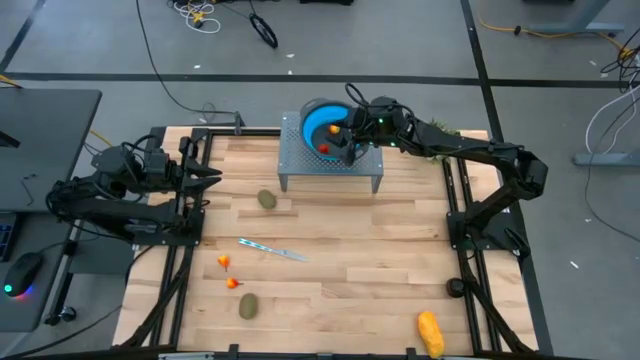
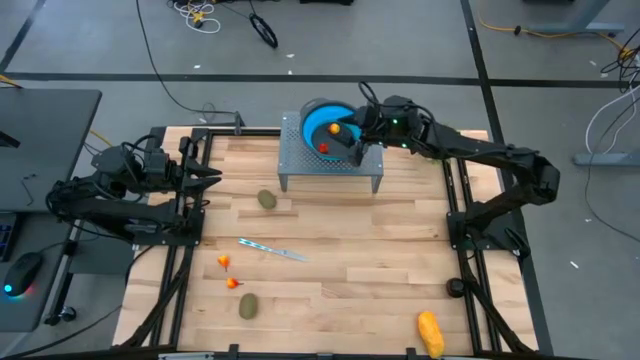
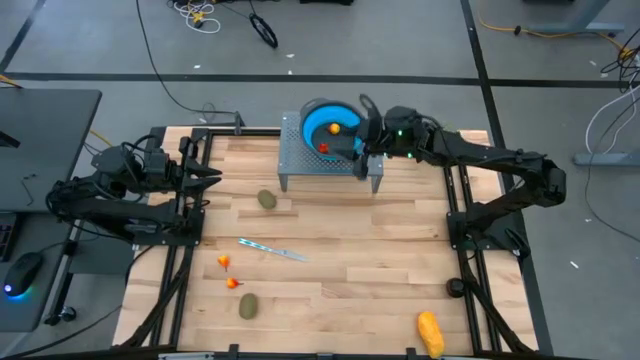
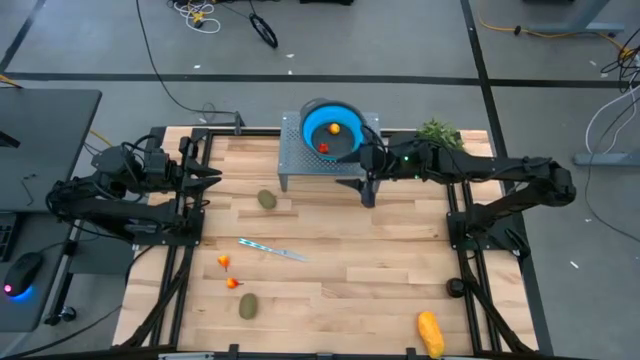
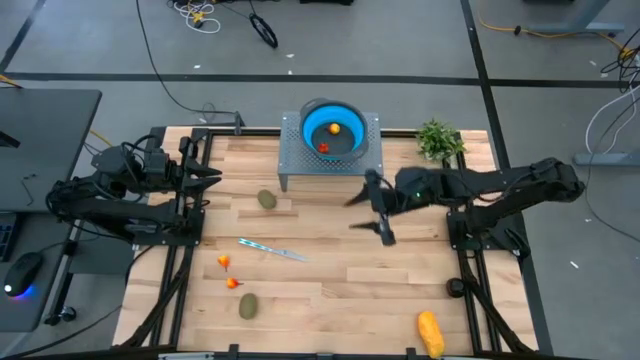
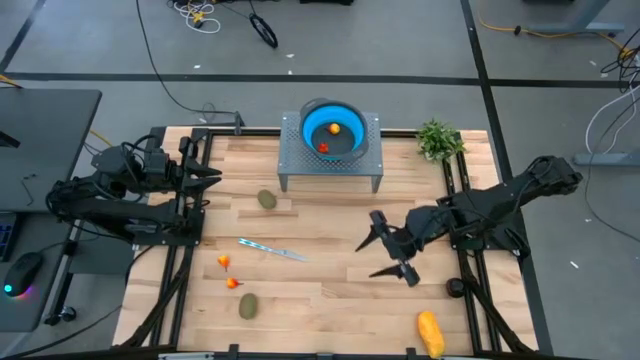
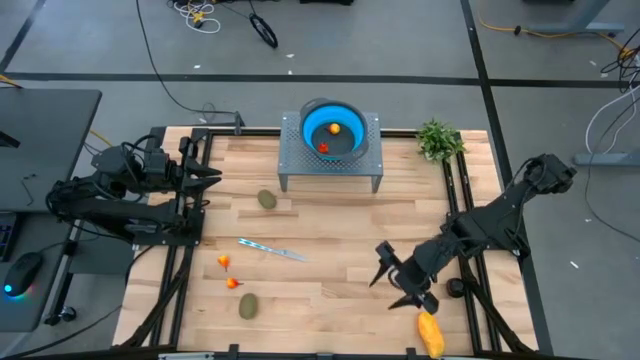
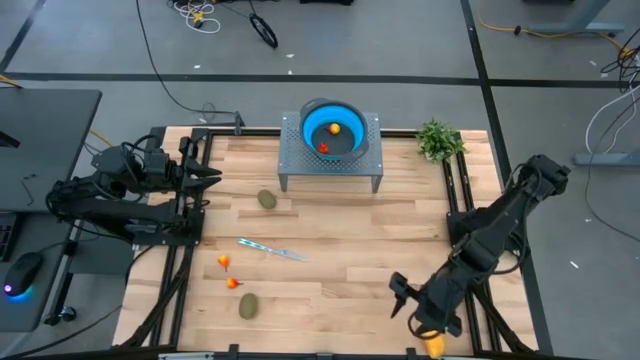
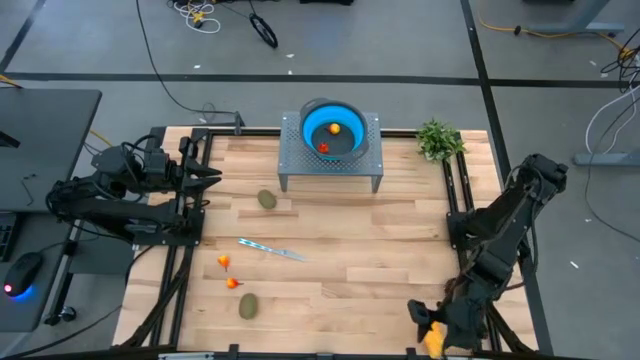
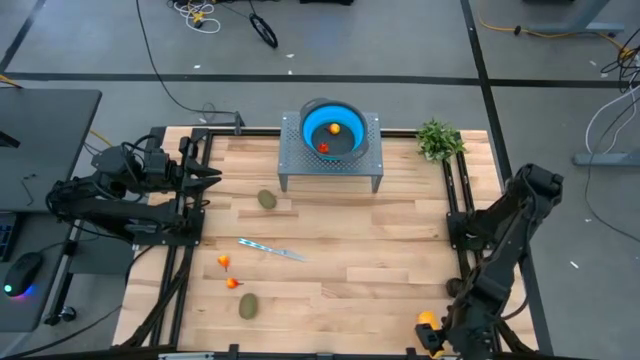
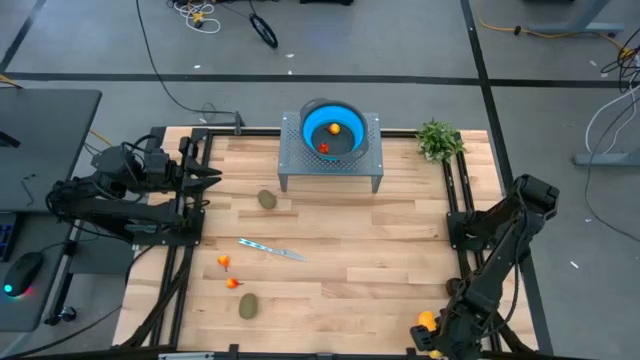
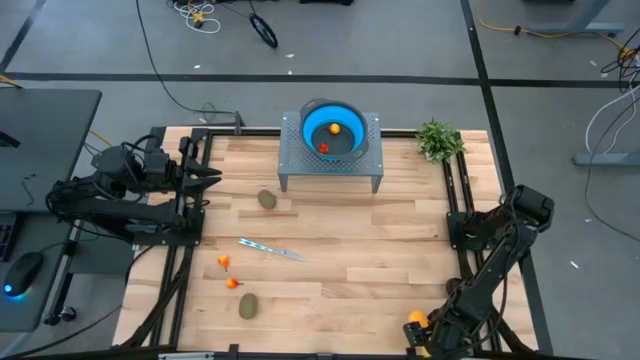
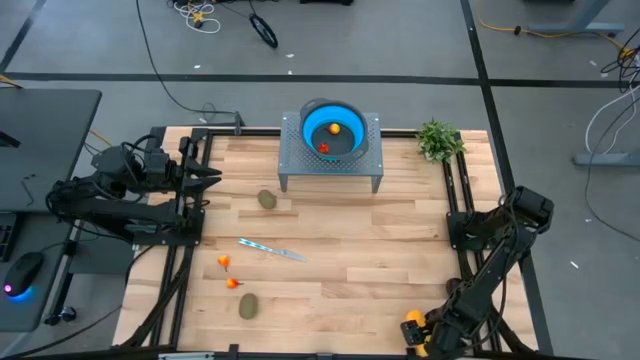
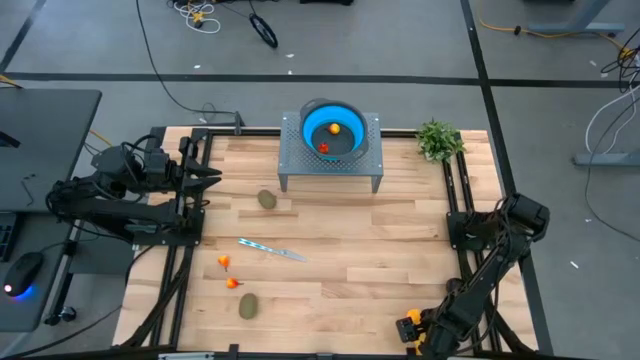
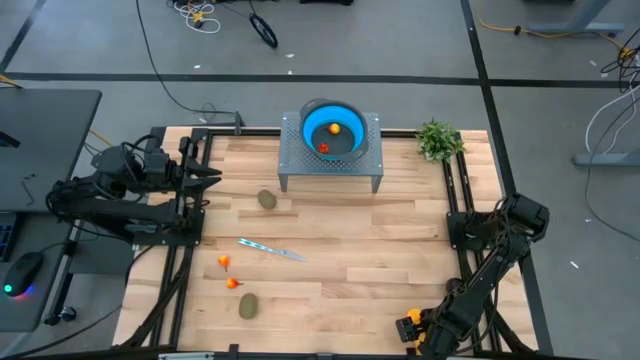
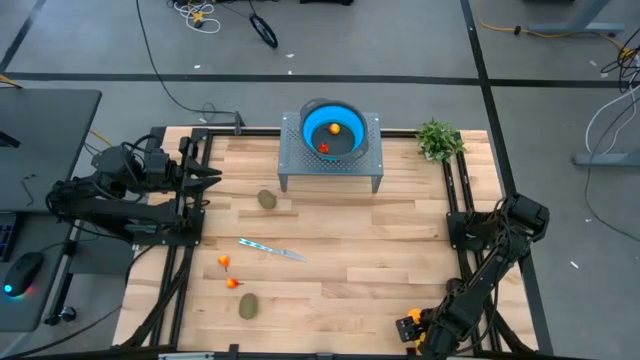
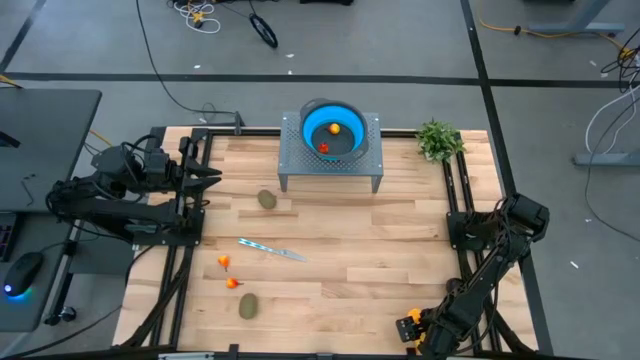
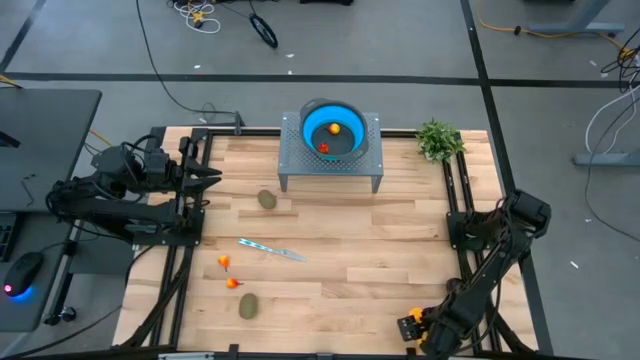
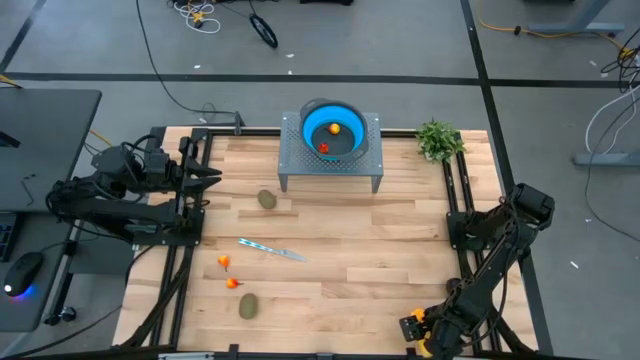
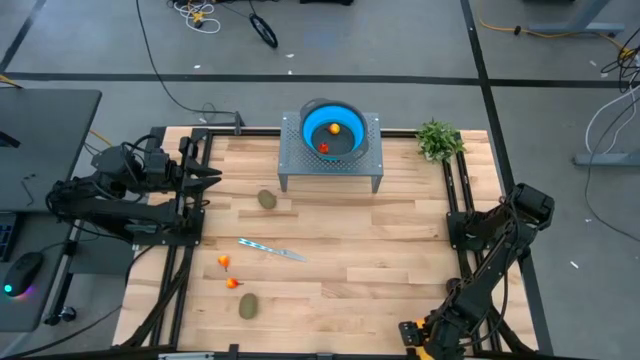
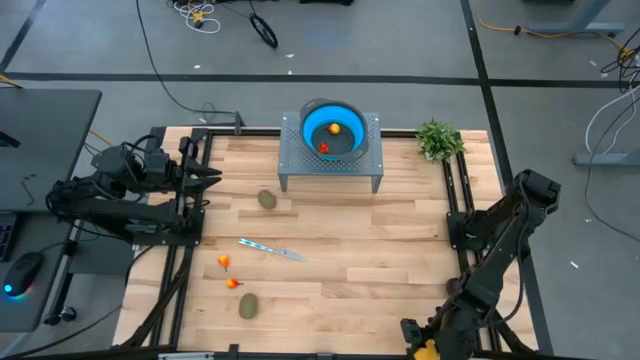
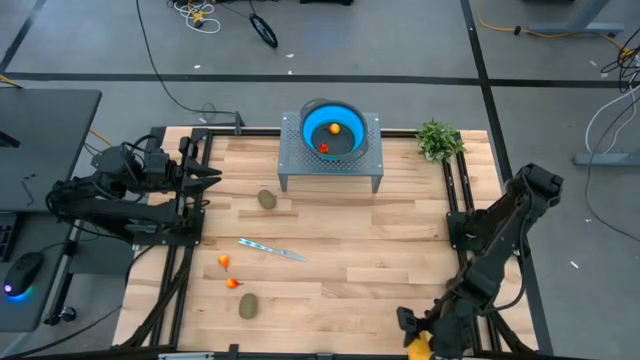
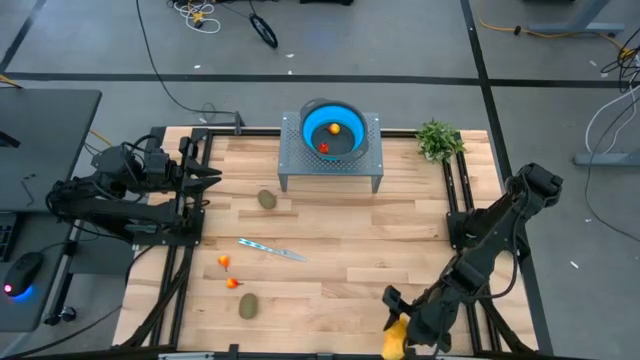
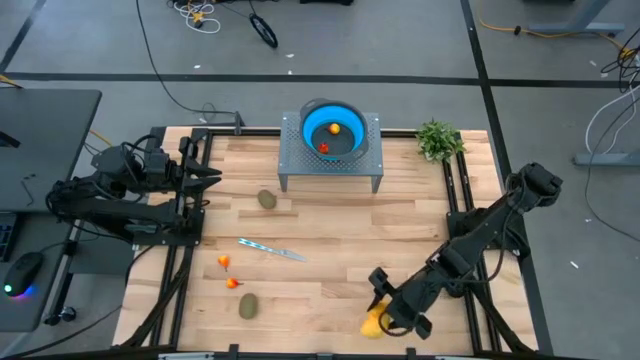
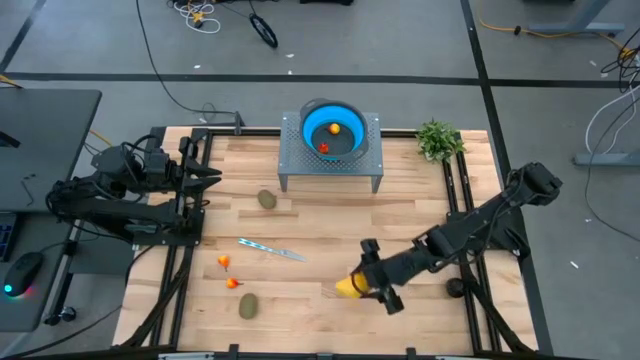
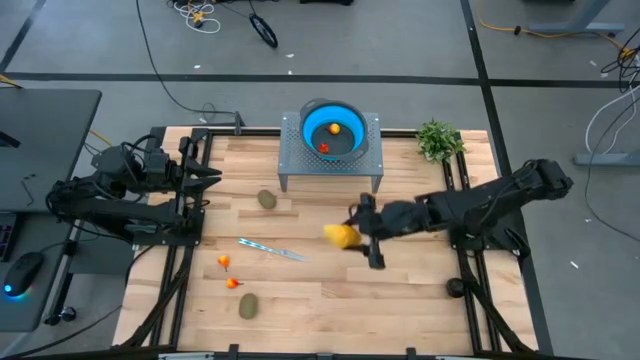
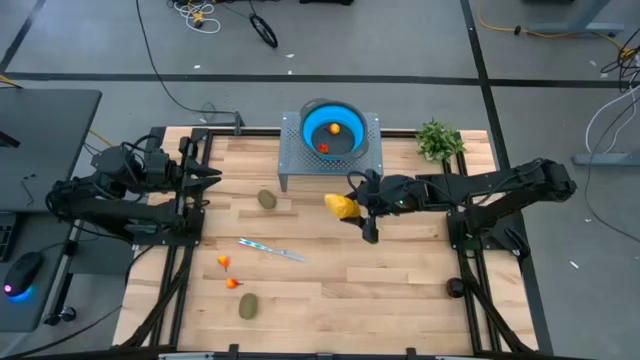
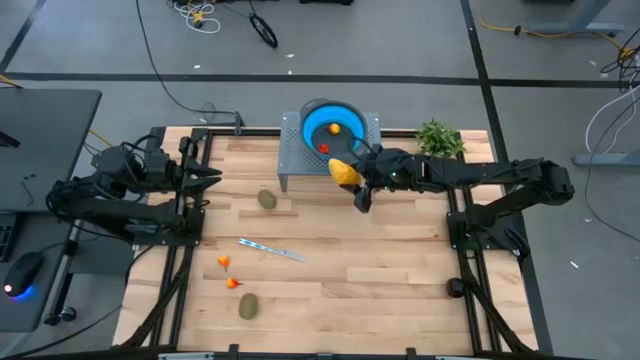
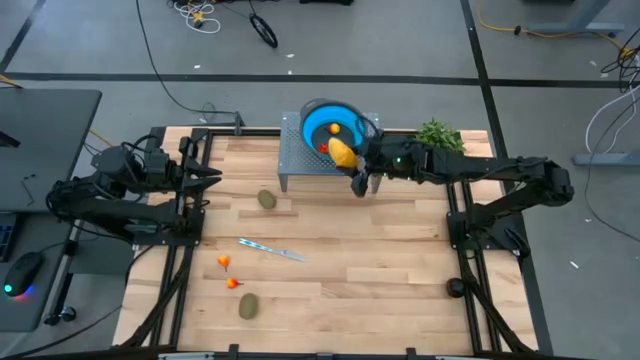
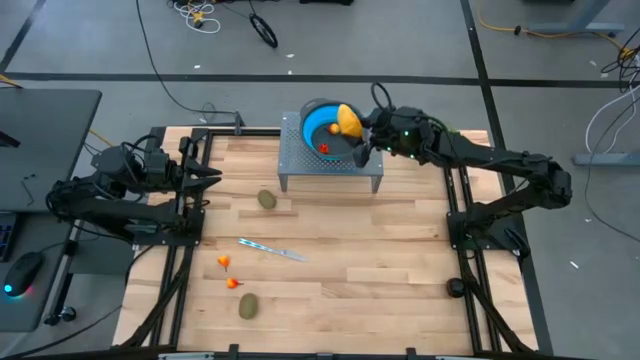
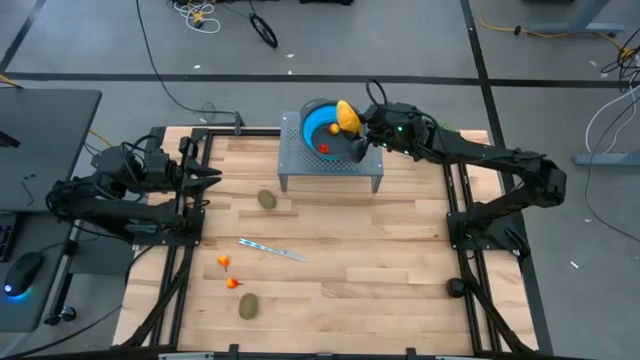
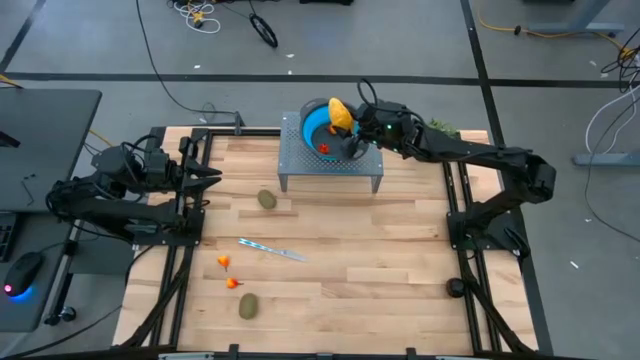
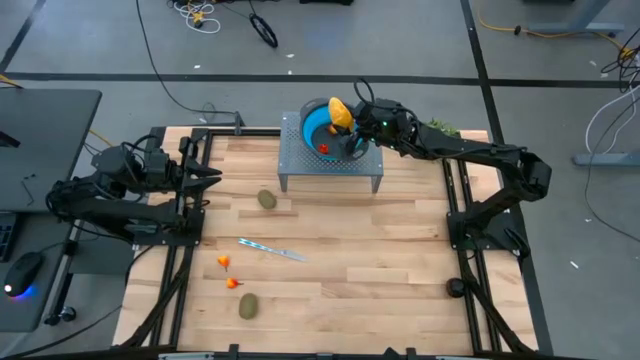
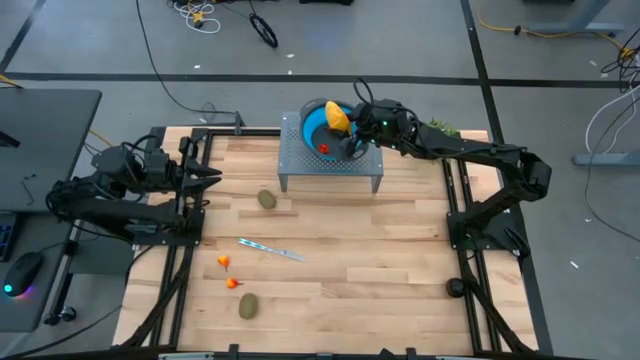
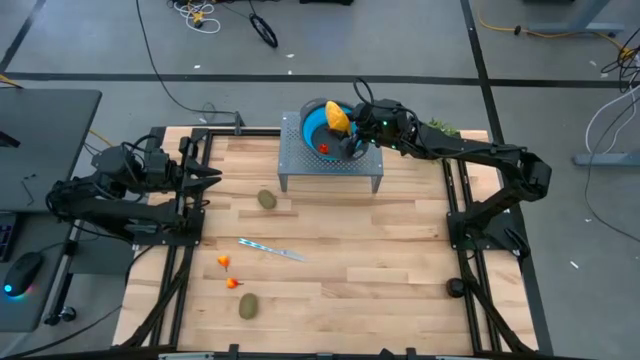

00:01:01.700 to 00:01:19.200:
Task: Pick & Place Fruit
Put the mango into the blue bin
